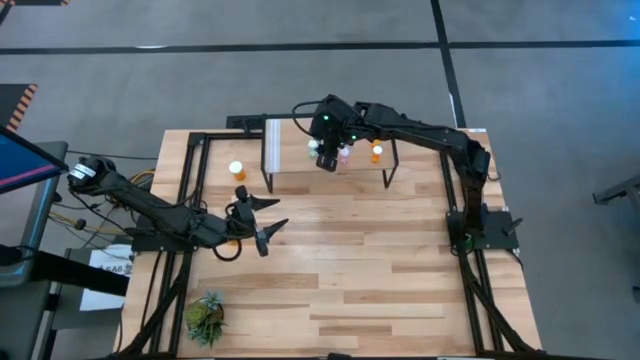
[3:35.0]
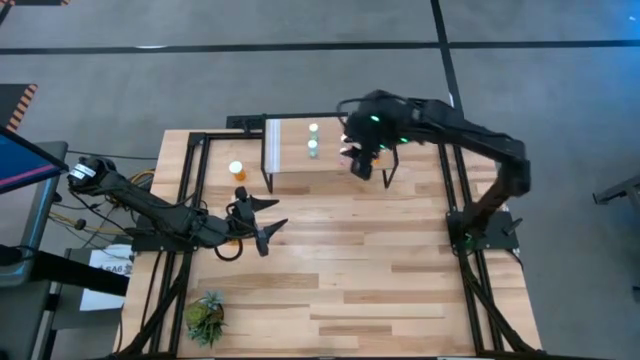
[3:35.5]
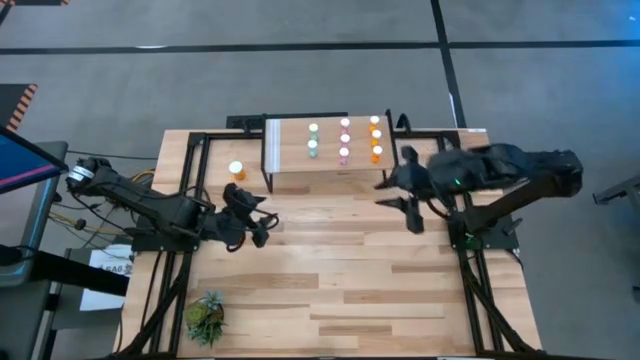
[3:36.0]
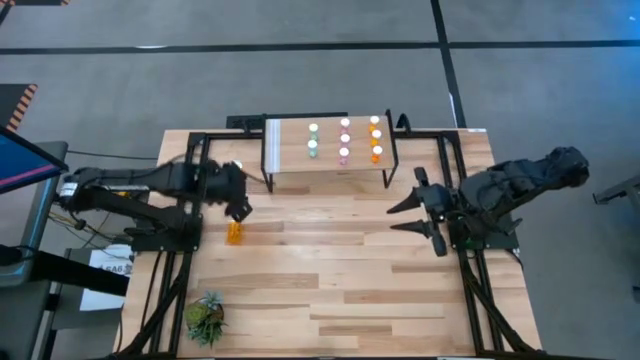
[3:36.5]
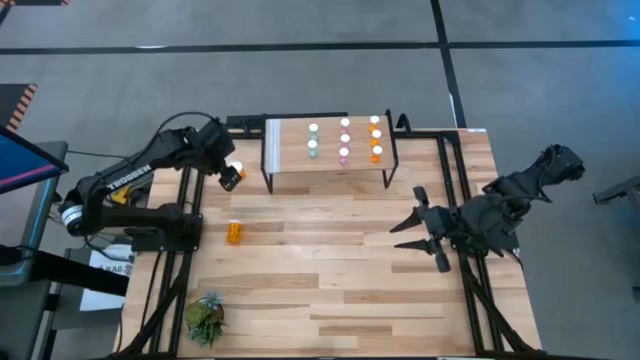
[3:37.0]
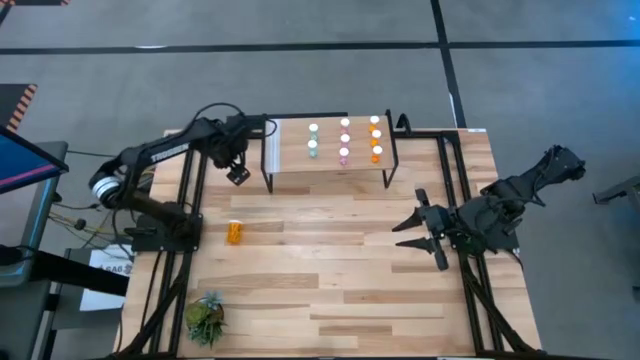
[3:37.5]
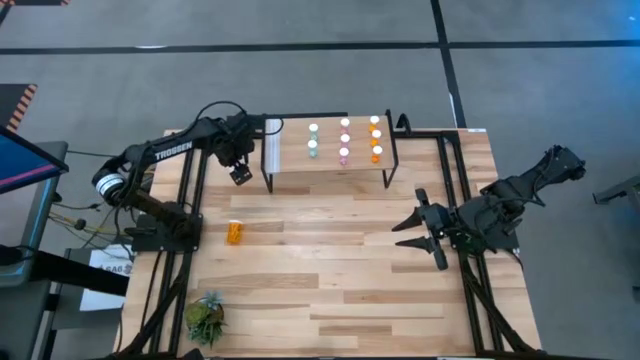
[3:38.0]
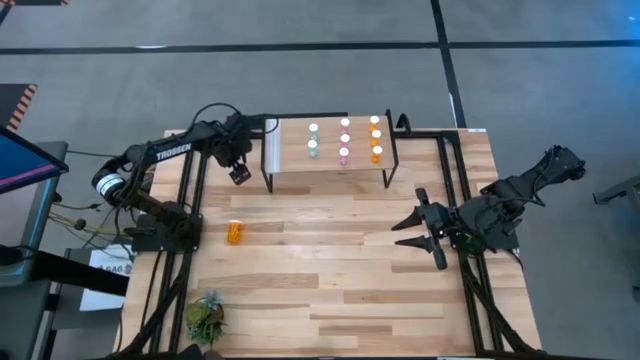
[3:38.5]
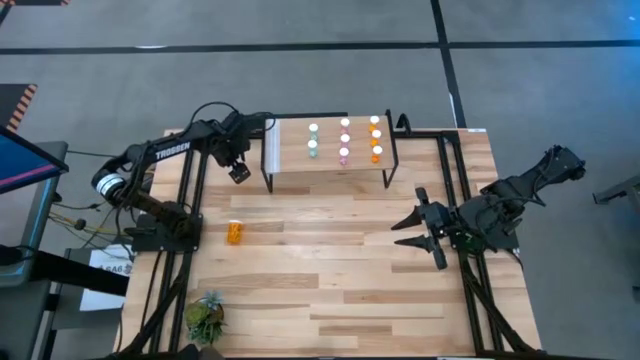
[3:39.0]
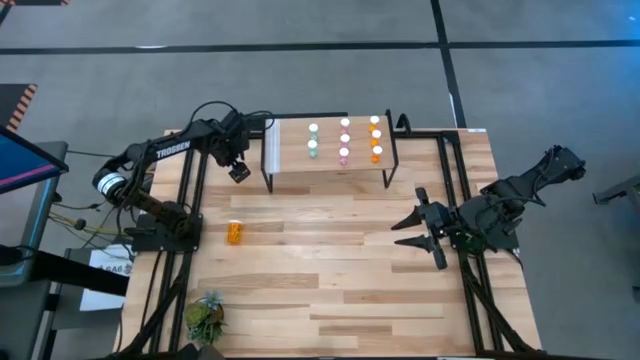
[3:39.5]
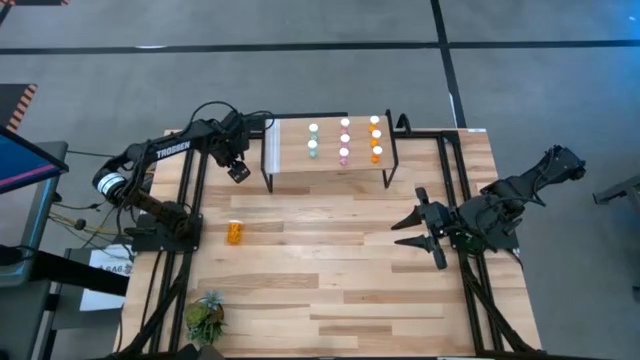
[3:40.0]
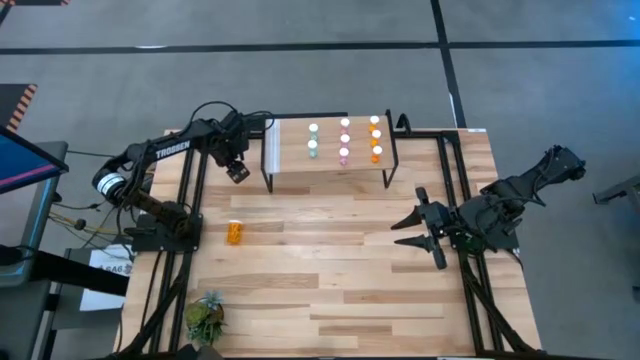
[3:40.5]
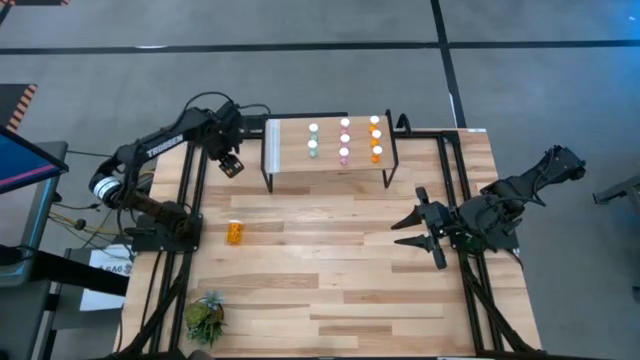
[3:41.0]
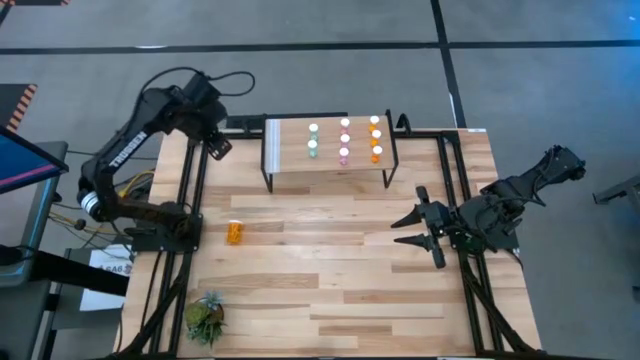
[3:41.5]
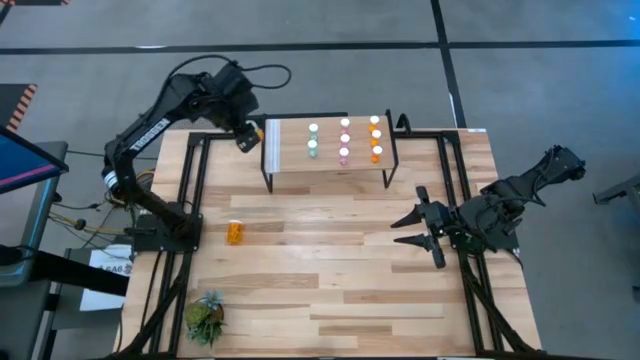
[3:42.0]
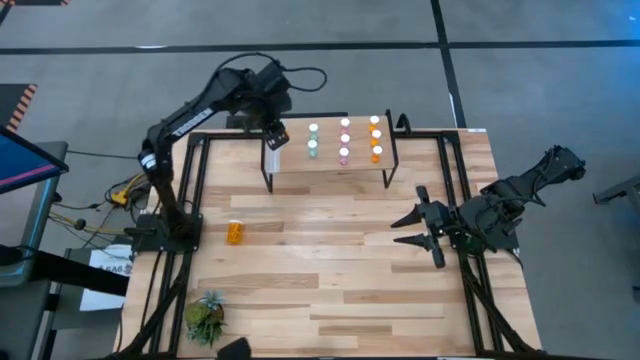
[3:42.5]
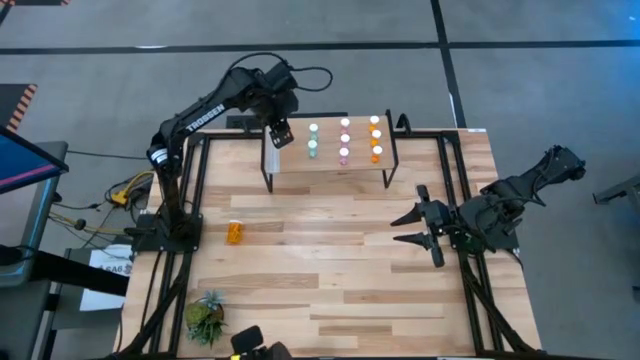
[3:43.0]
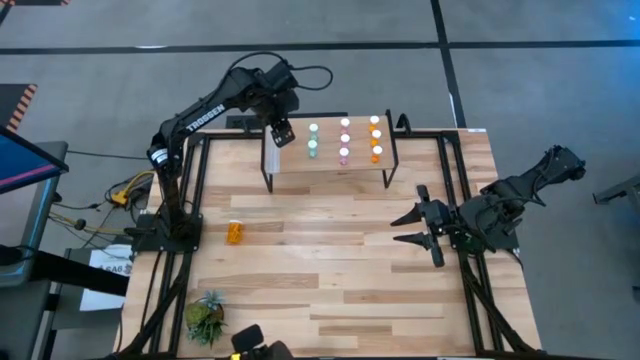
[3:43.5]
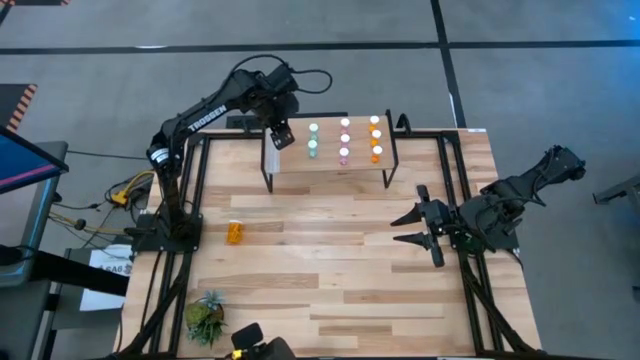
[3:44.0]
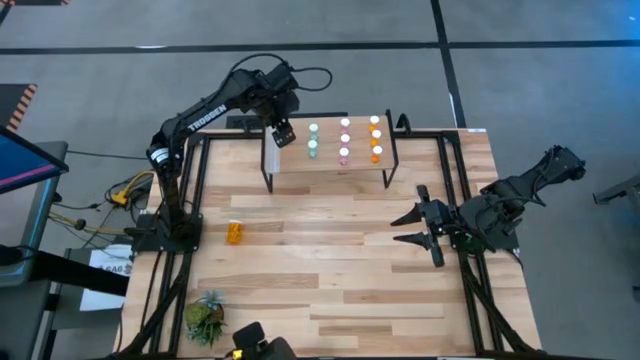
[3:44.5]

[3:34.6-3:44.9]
Task: Pick and place medicine bottles onto shelf by color
Put the top large orange pill bottle on the shelf

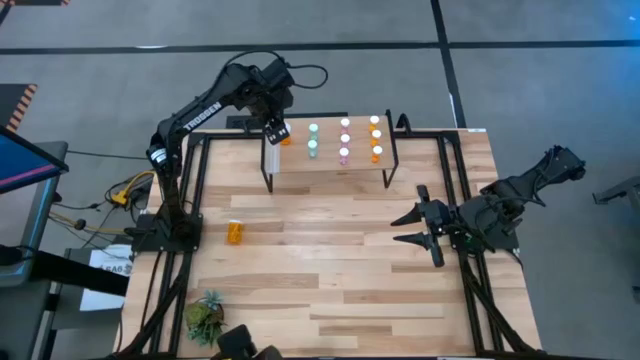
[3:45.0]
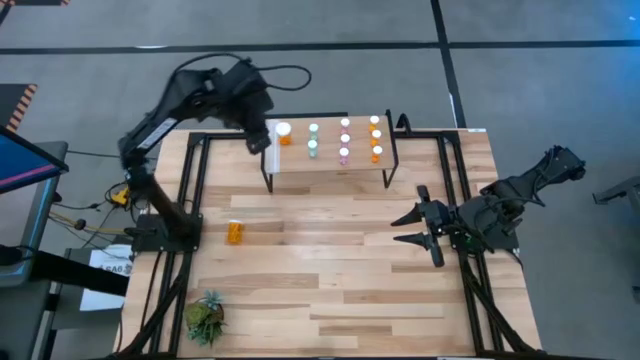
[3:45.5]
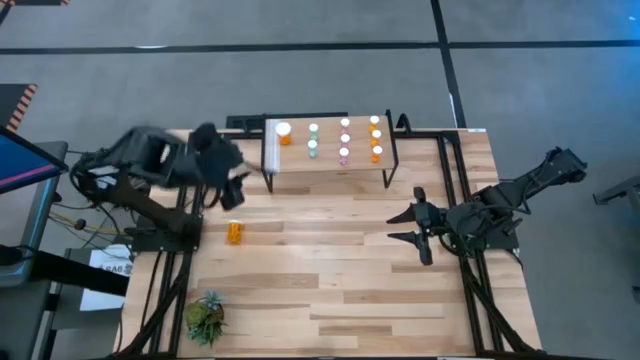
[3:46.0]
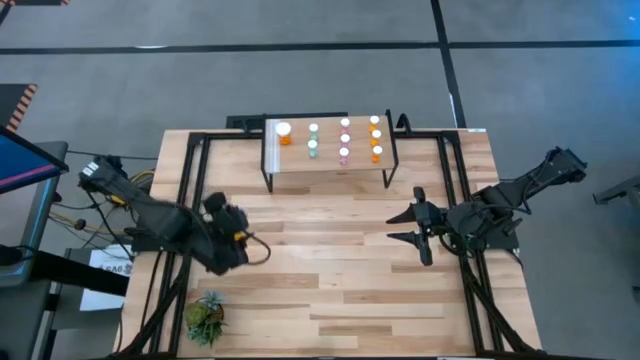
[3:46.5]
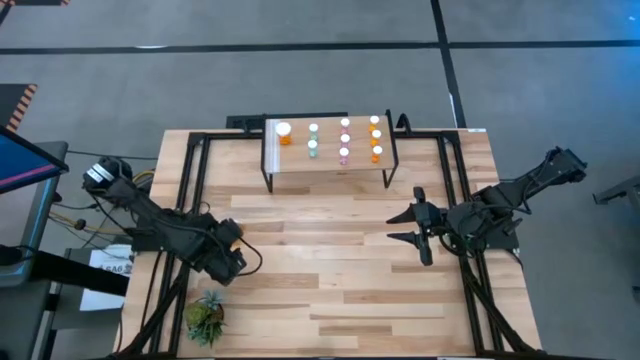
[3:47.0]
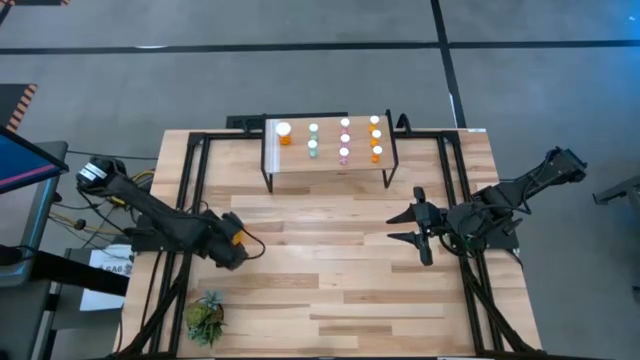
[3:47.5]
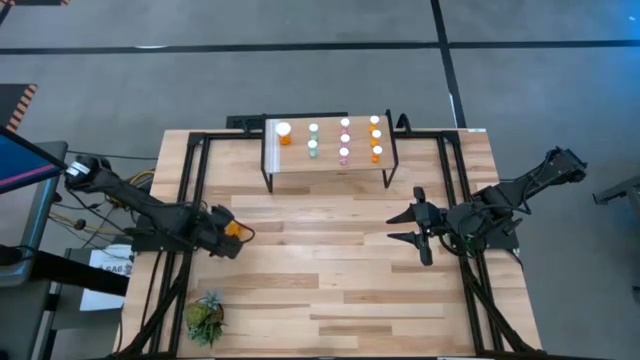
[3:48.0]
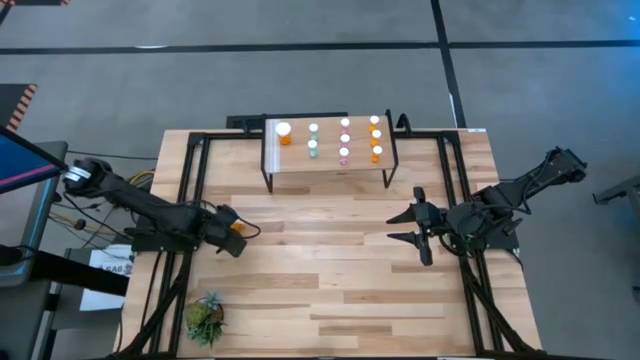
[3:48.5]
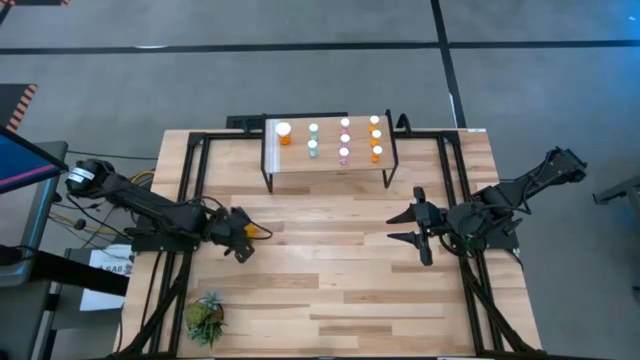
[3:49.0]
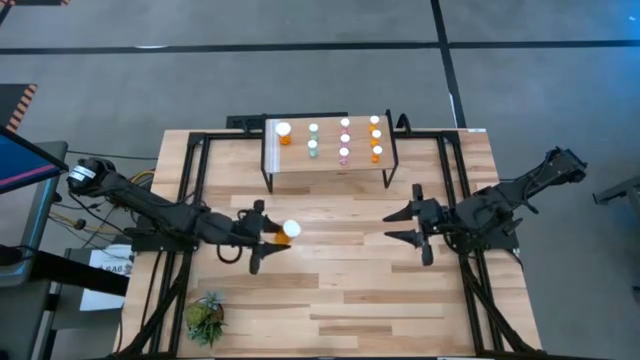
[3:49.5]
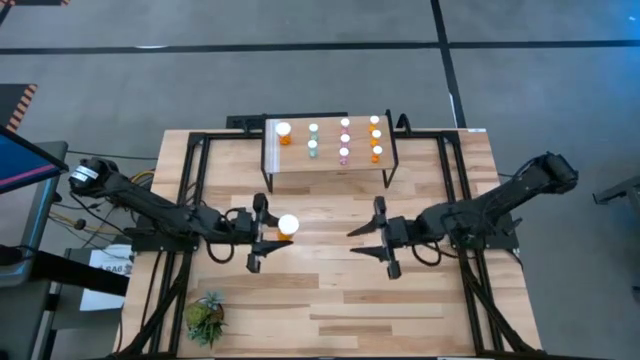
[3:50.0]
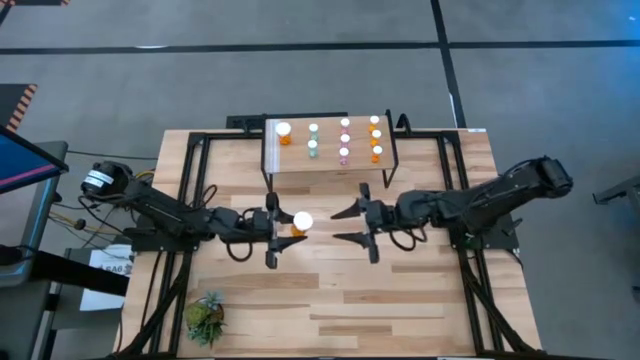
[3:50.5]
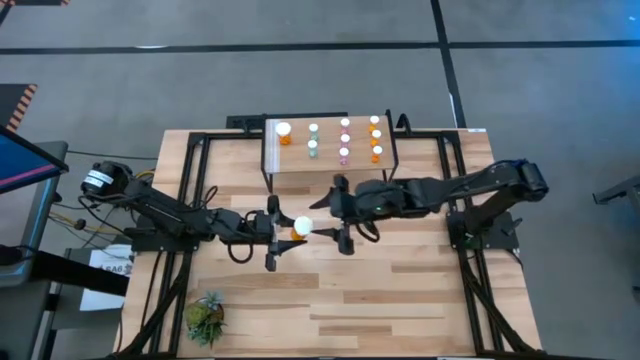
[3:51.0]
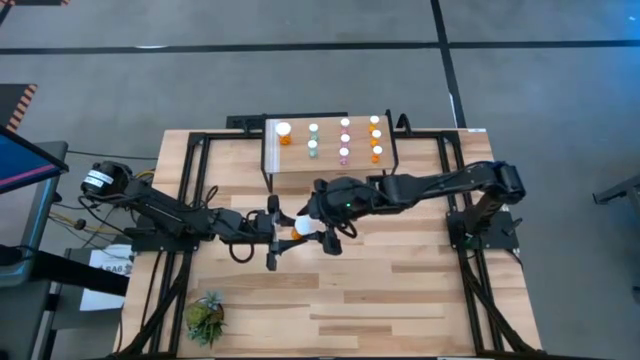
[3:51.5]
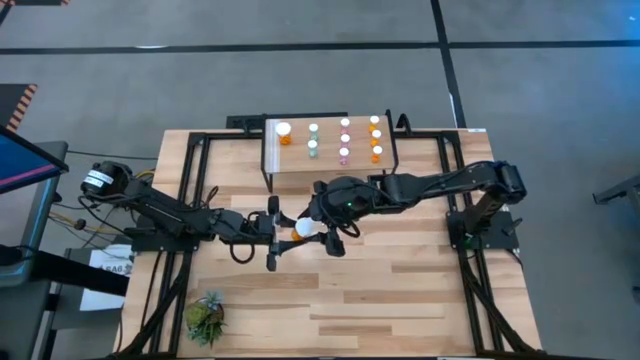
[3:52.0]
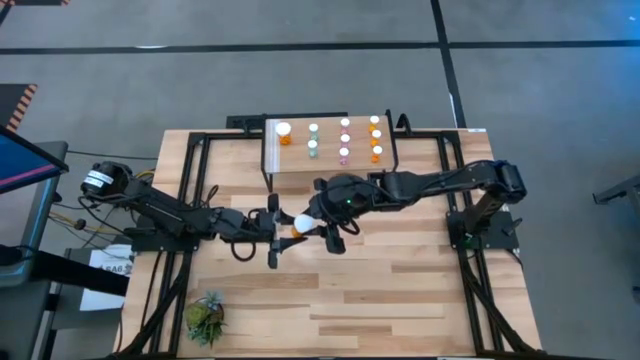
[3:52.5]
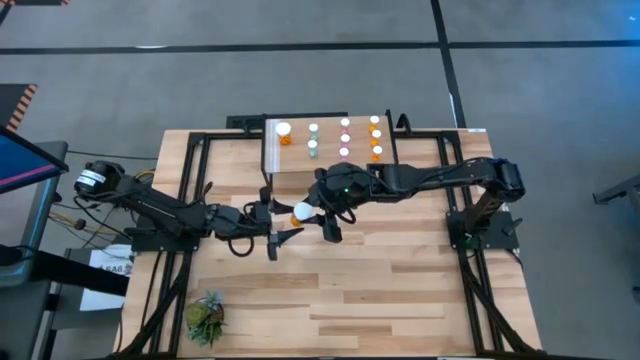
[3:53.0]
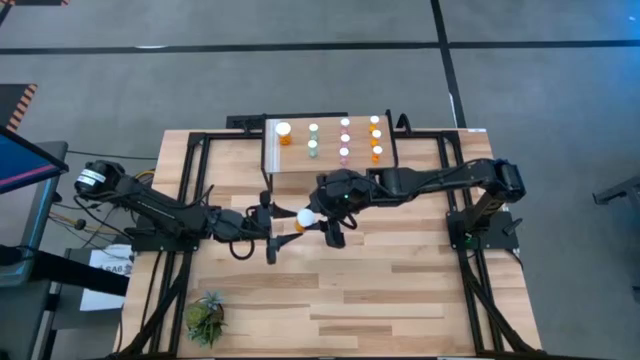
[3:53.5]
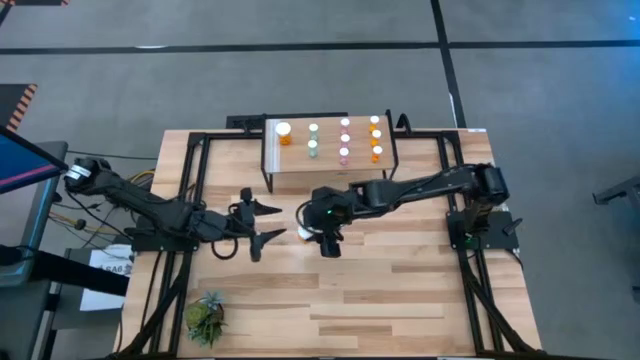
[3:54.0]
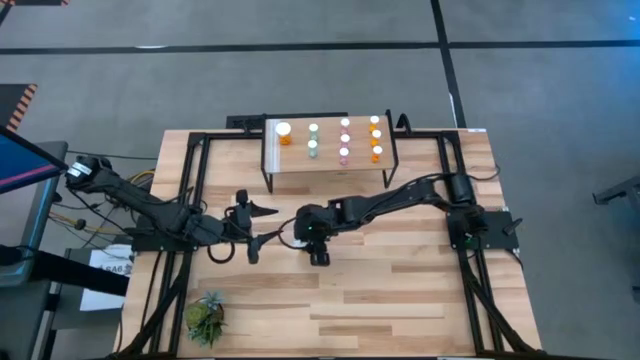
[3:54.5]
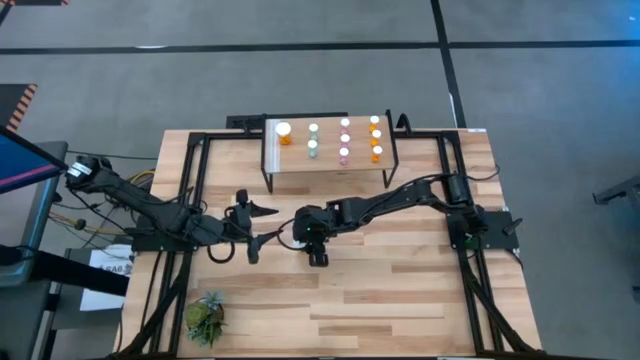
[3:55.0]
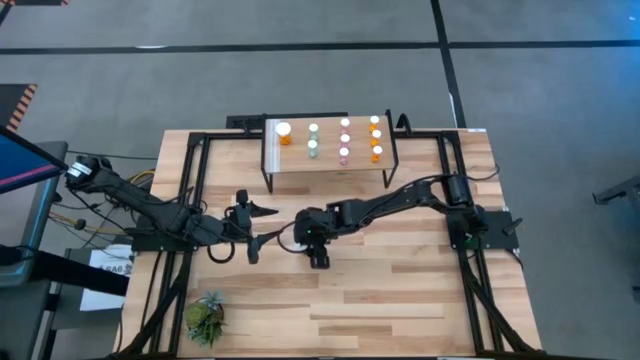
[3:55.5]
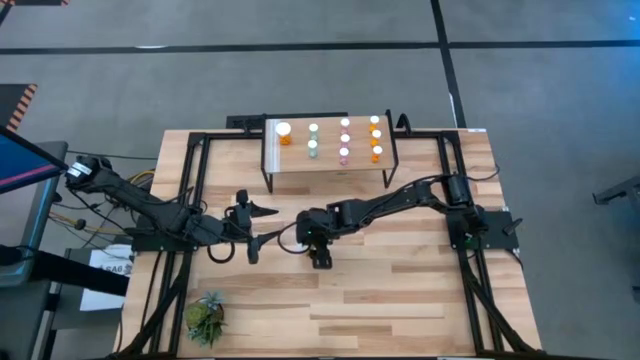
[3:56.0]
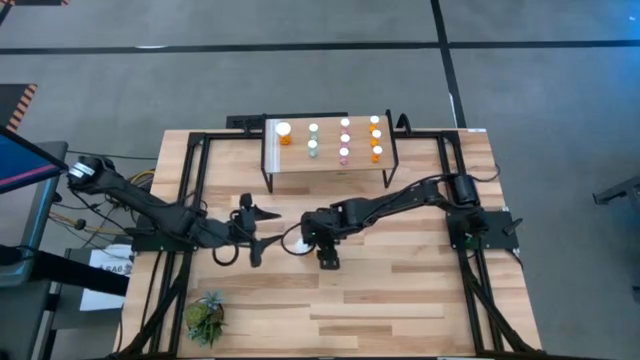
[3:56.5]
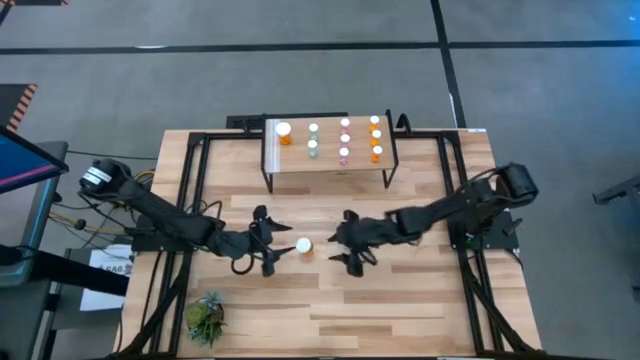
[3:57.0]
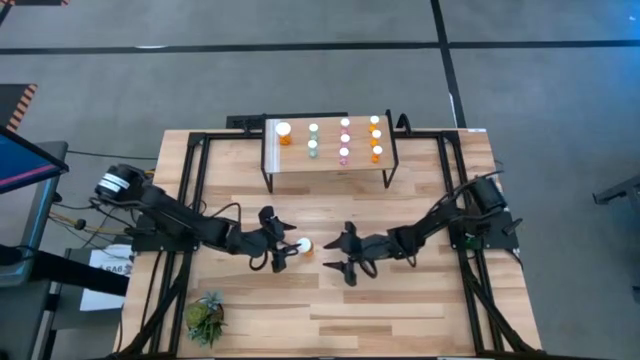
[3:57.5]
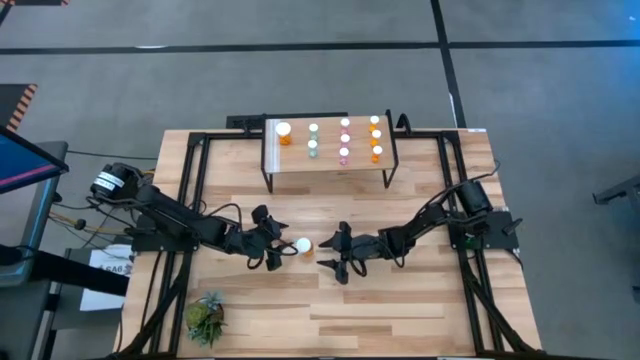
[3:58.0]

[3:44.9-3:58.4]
Put the large orange pill bottle on the shelf aligned with the other large orange pill bottle
